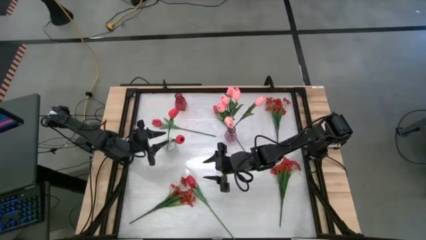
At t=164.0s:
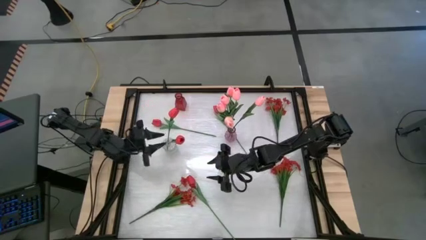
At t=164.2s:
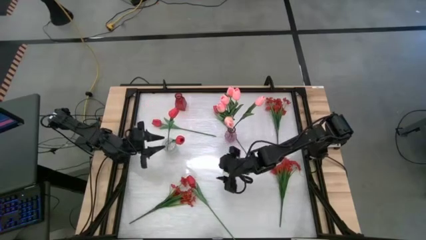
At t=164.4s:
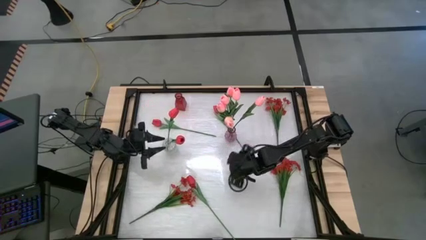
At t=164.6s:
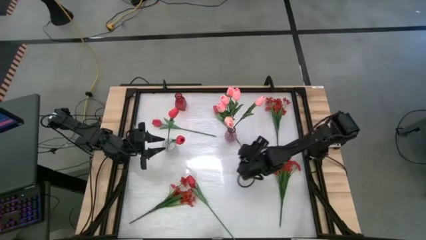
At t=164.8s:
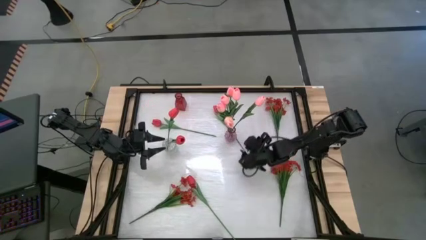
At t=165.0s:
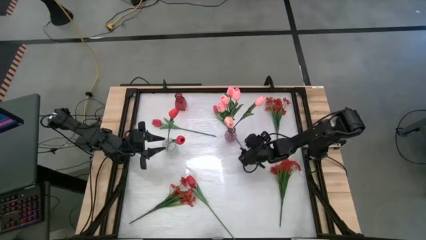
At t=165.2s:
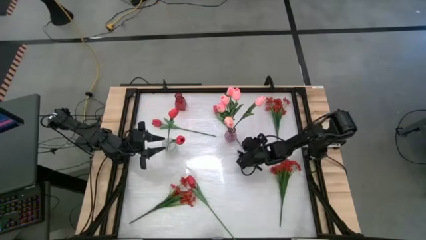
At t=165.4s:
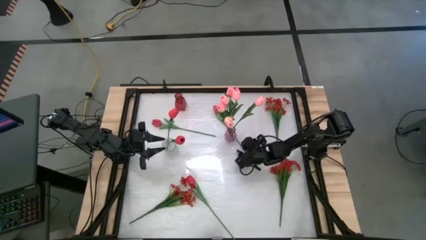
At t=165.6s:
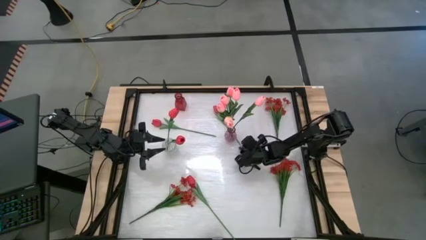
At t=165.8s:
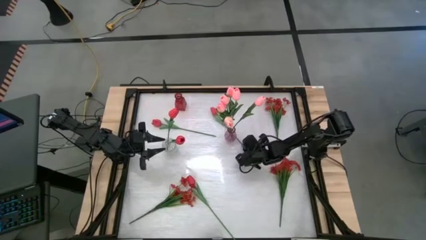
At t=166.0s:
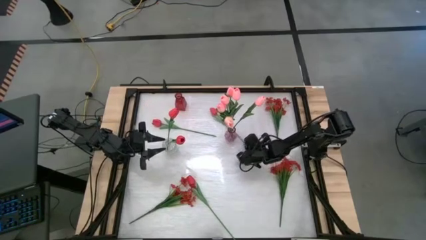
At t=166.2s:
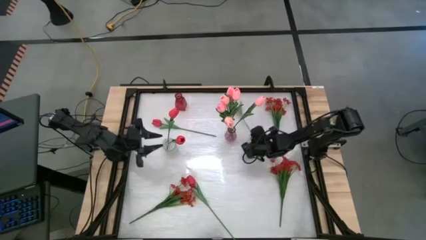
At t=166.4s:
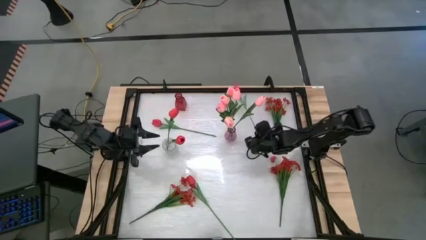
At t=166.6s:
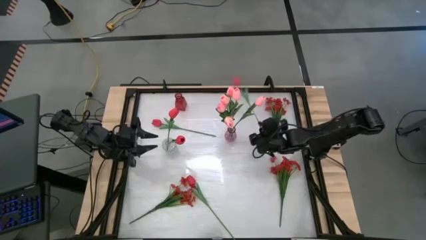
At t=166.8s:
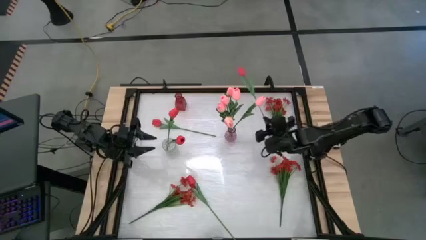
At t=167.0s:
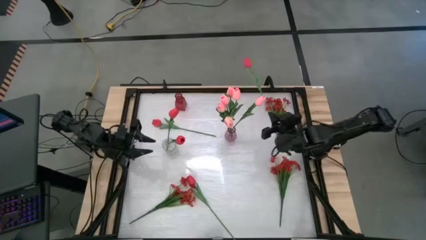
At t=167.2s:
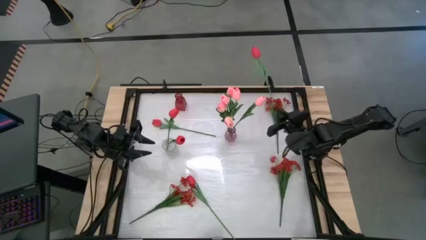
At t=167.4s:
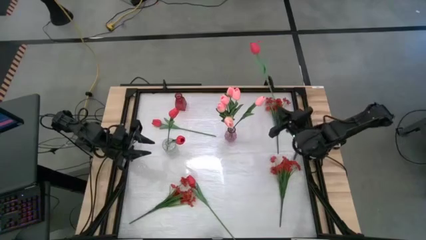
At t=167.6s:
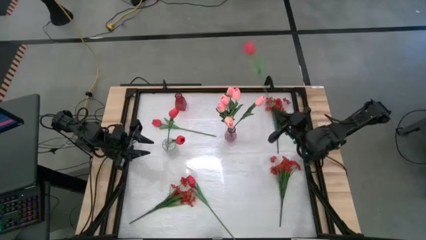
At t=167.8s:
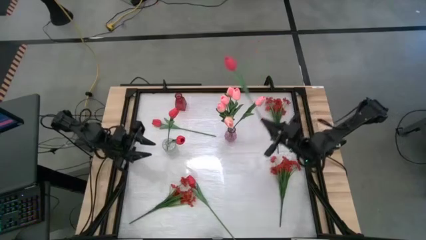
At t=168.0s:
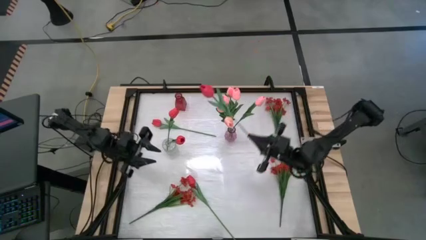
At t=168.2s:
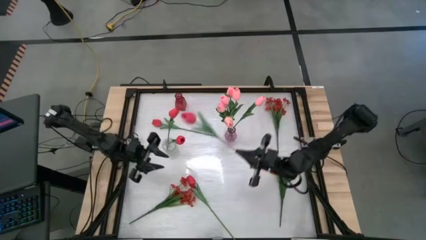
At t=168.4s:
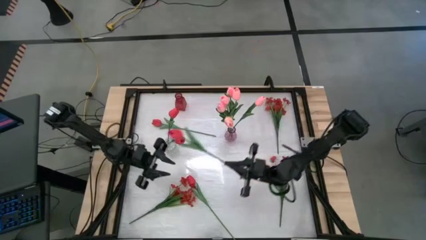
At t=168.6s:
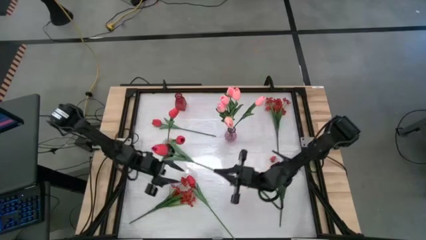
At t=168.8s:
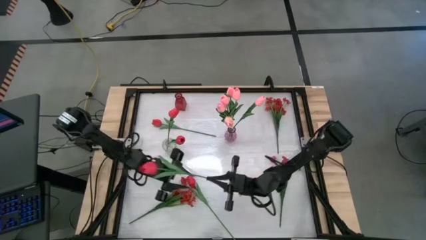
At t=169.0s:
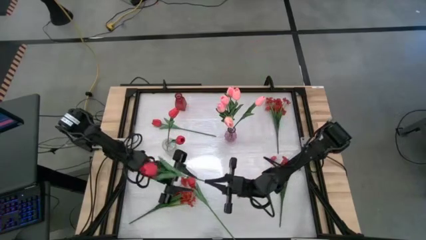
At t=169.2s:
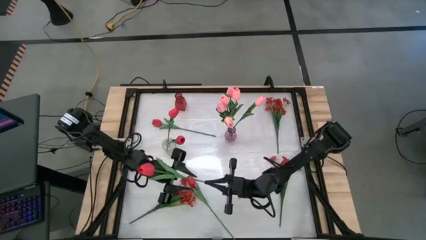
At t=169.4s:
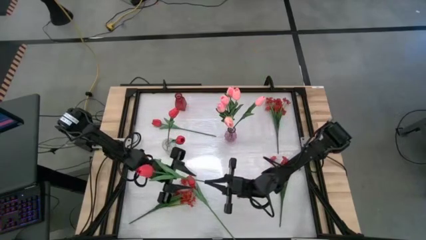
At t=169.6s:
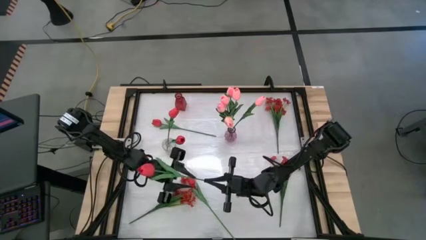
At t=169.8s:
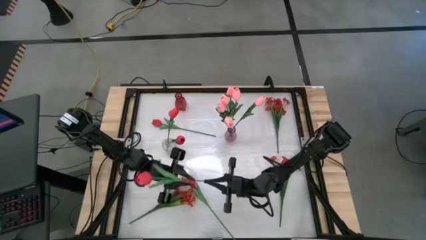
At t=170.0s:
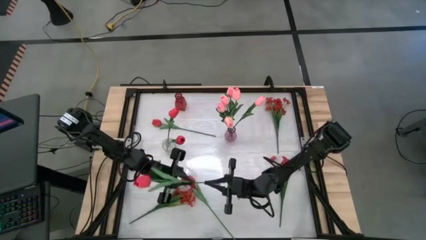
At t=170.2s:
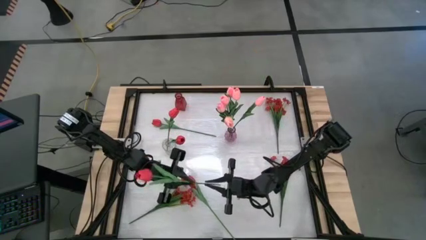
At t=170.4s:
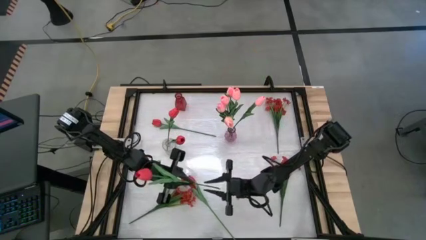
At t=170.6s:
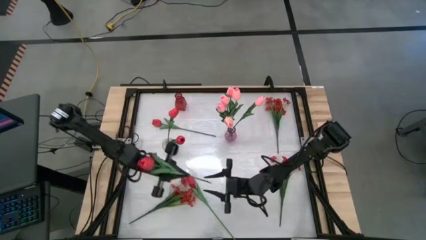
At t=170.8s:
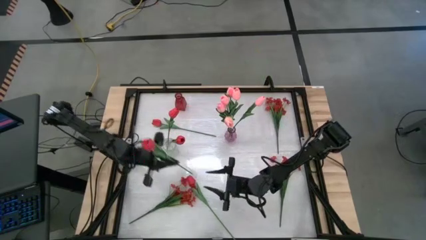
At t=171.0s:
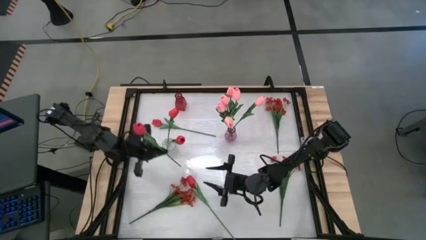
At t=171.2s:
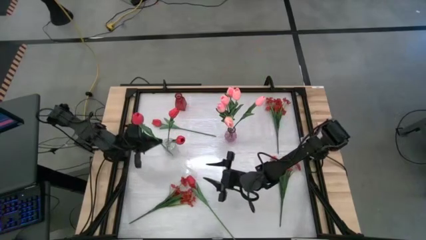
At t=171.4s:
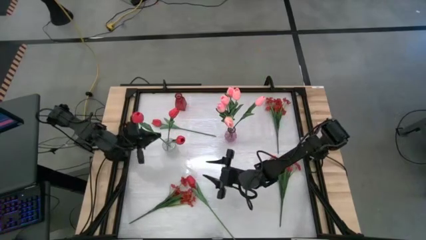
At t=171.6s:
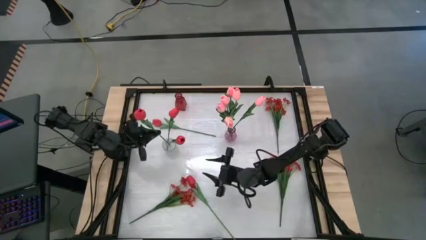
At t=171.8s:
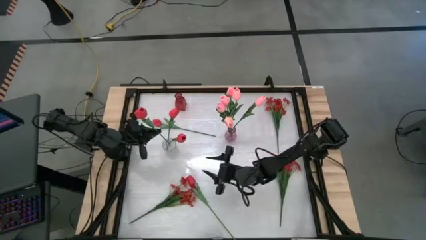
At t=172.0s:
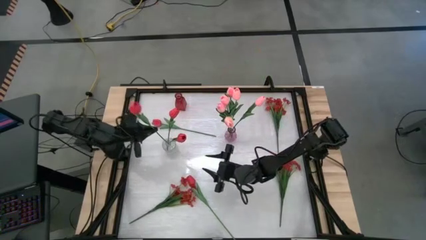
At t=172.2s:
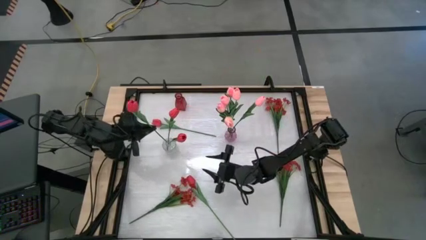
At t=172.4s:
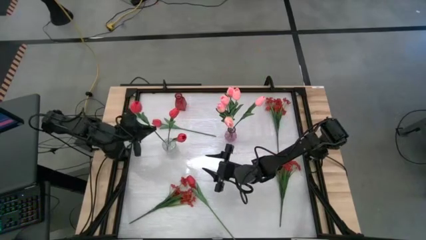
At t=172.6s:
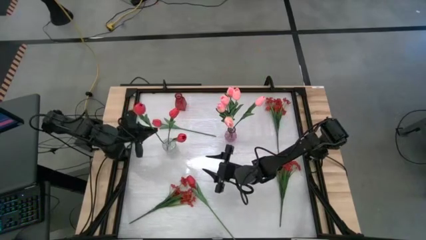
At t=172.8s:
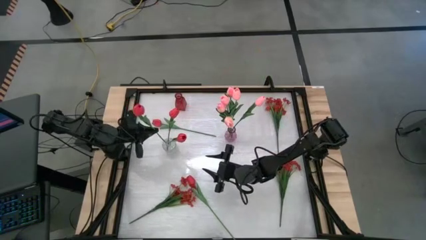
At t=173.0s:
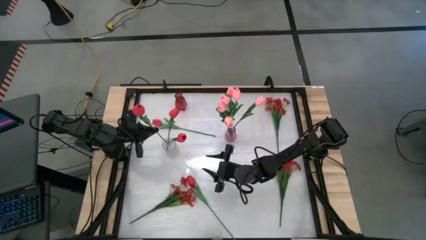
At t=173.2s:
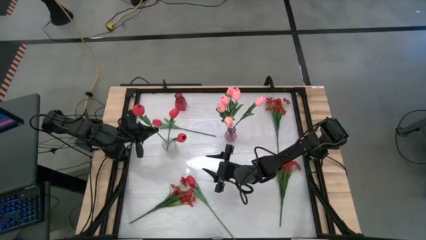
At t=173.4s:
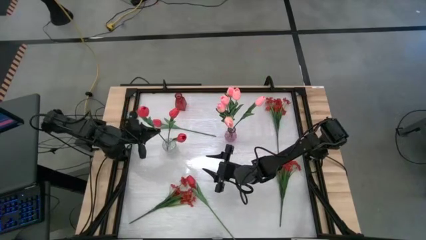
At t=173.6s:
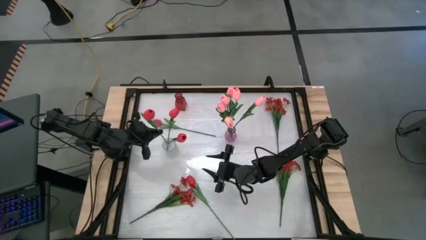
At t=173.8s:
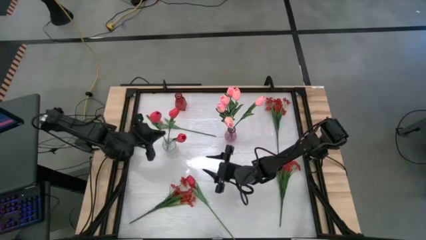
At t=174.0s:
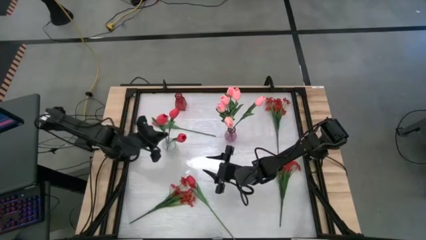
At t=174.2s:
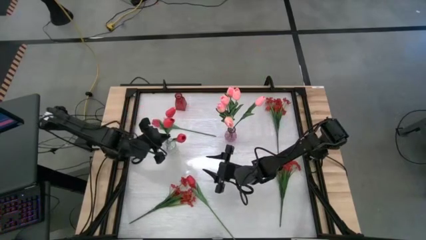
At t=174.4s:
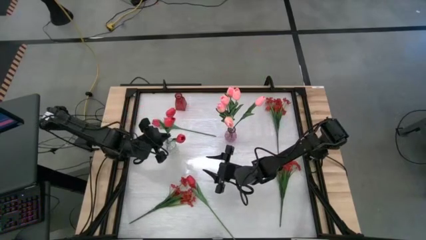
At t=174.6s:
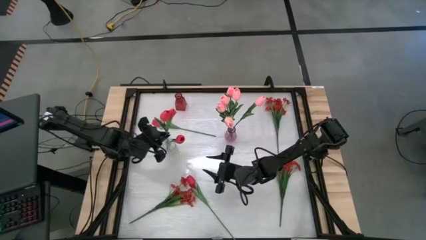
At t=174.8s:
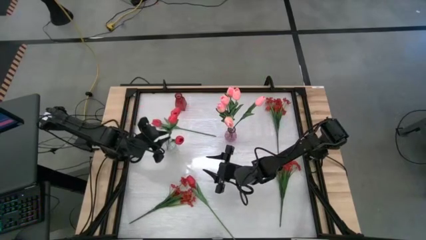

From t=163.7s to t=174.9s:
Task: Sort flowers into vase by color
Put the red tulip into the transparent vase

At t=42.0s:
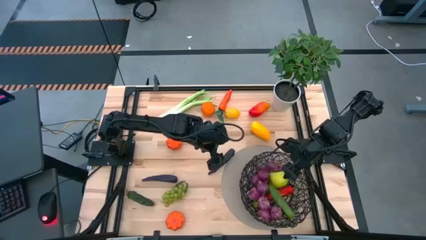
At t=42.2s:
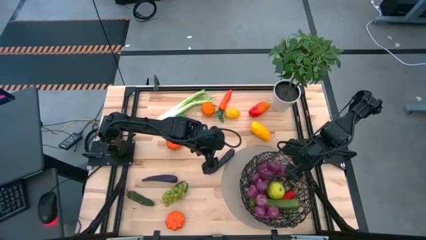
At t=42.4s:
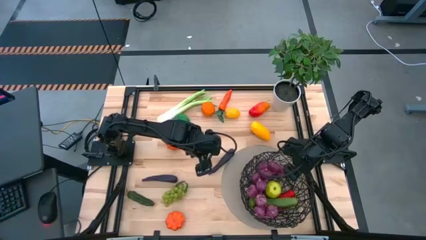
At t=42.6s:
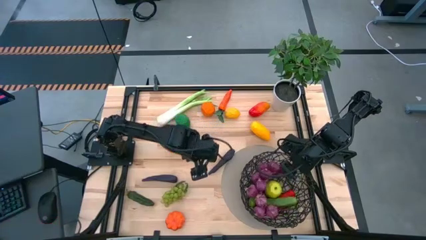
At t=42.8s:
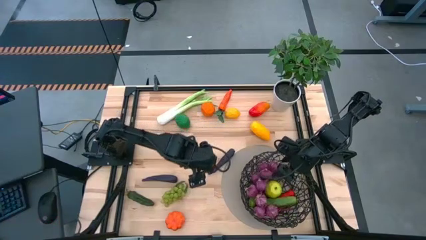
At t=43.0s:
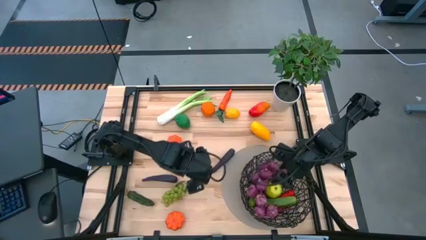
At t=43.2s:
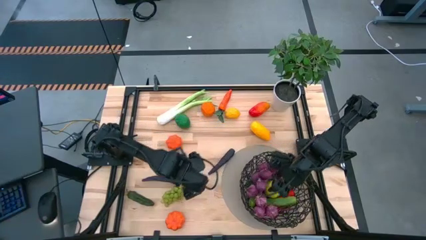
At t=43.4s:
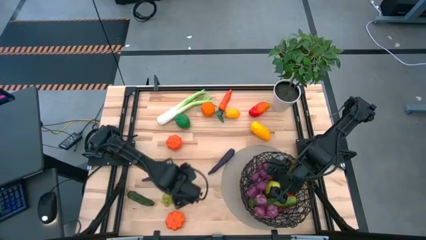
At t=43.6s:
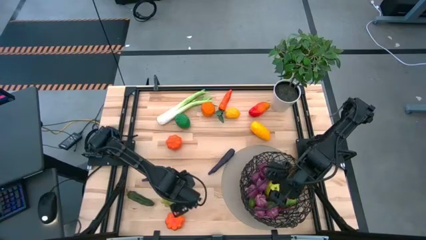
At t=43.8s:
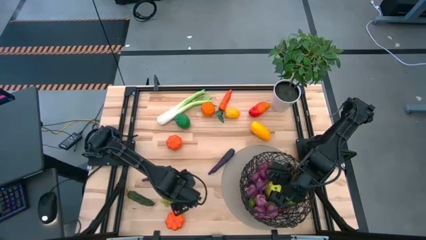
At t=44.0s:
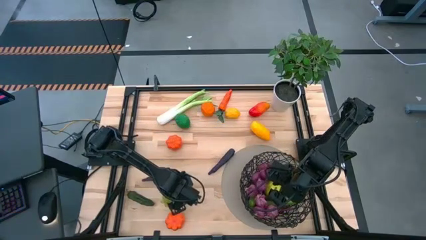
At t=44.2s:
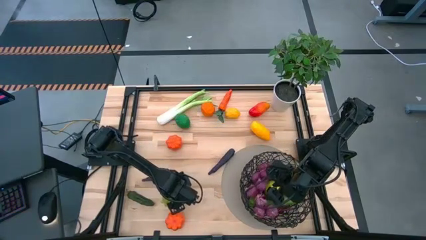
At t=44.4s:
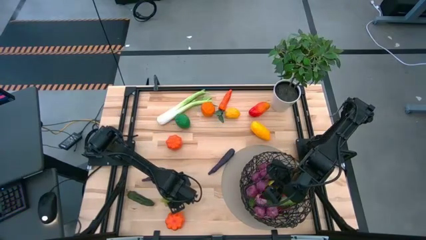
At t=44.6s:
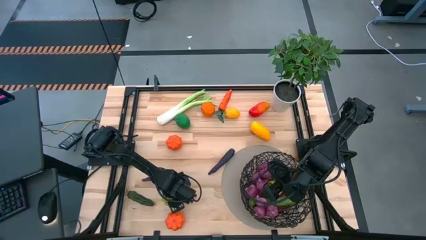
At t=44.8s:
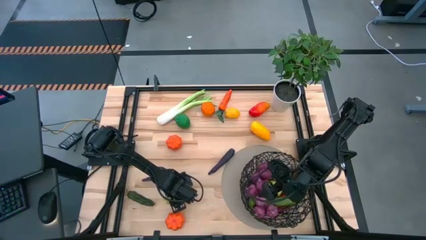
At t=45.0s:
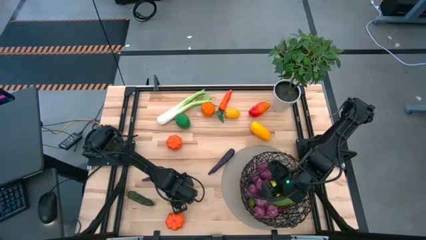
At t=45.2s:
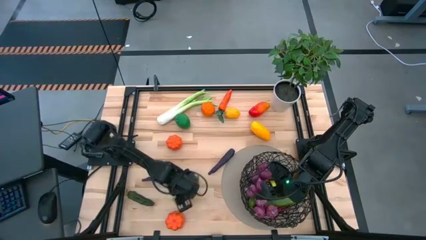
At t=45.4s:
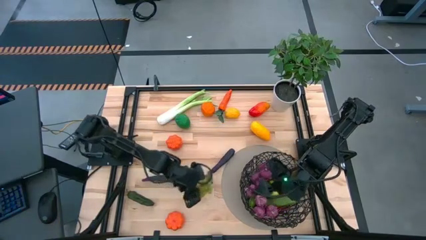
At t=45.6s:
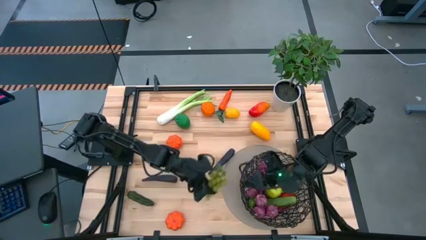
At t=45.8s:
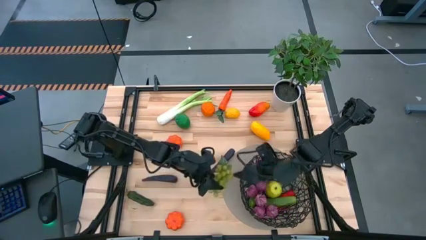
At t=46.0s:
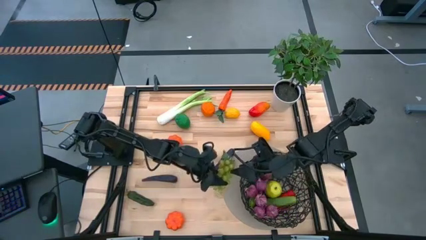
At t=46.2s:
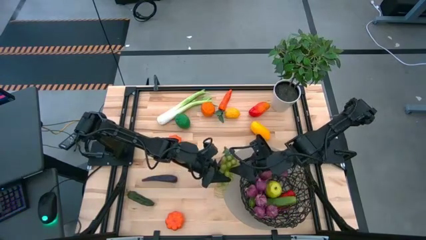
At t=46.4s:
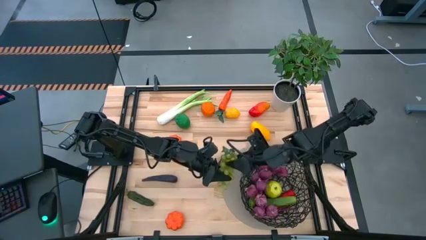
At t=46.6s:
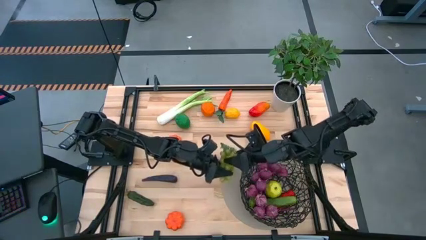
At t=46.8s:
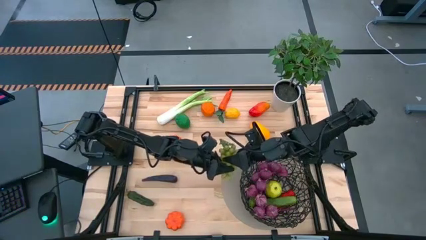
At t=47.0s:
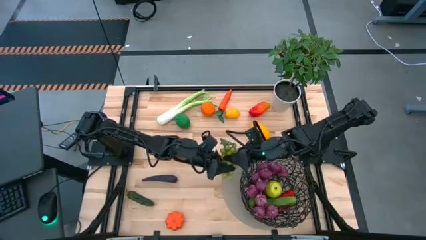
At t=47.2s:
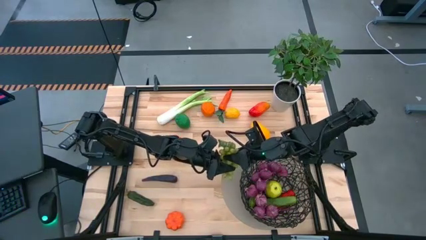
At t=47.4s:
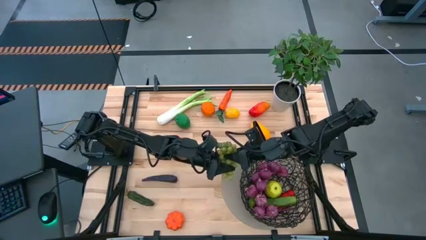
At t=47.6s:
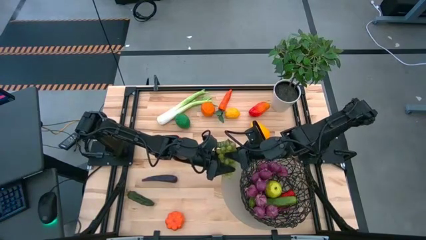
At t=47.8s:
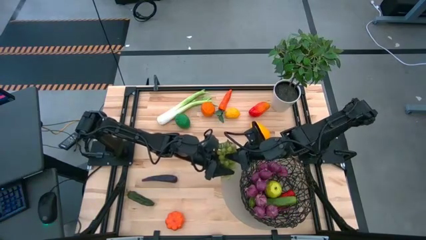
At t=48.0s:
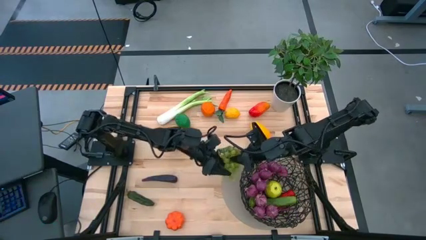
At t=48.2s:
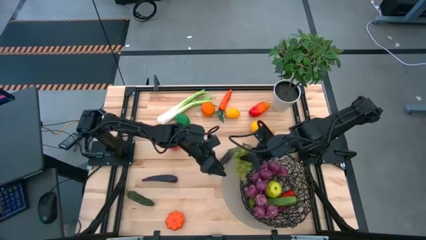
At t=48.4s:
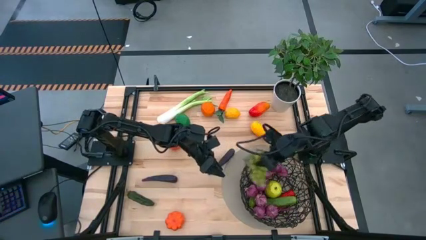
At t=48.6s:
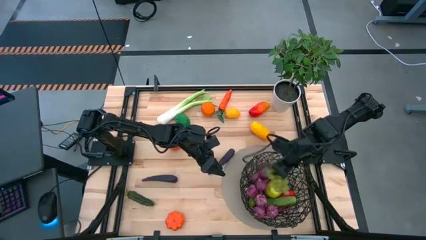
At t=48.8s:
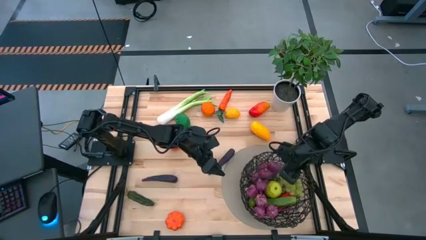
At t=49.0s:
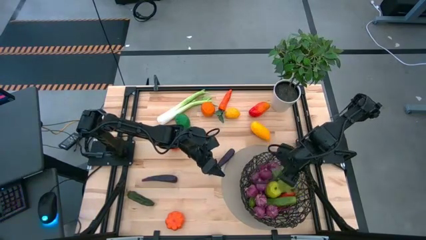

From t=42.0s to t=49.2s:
Task: Build produce basket
Put the green grapes into the black basket
